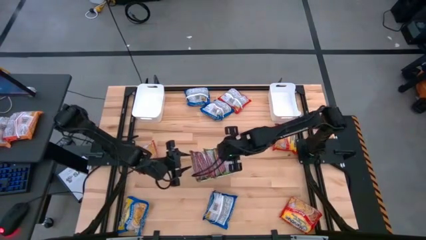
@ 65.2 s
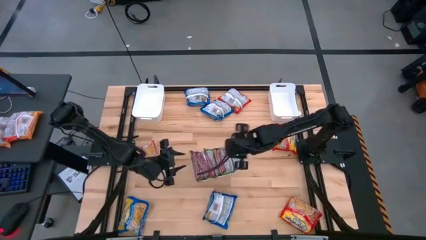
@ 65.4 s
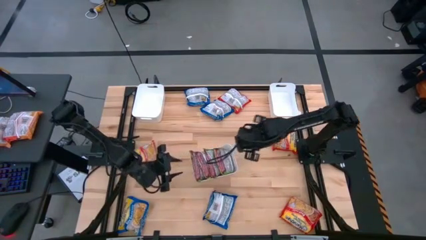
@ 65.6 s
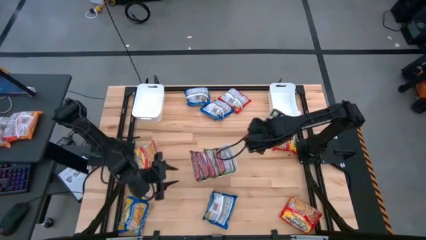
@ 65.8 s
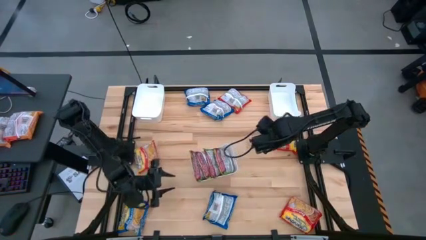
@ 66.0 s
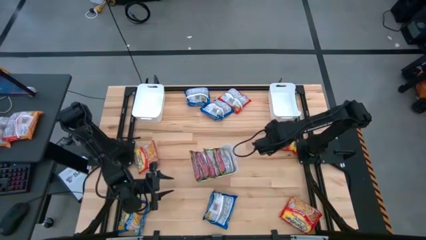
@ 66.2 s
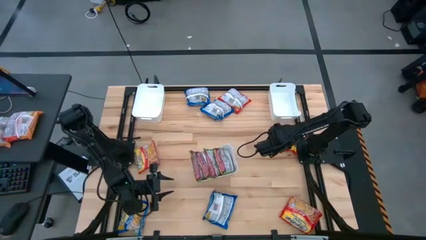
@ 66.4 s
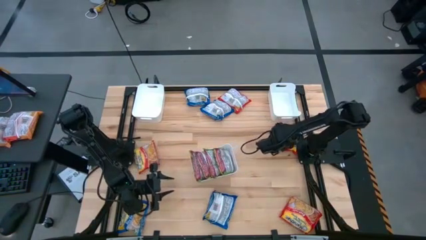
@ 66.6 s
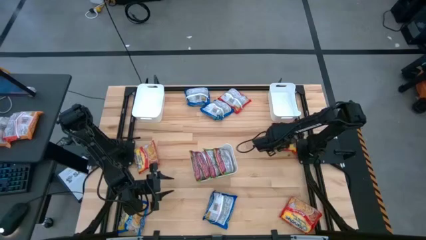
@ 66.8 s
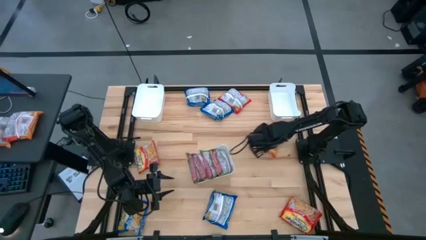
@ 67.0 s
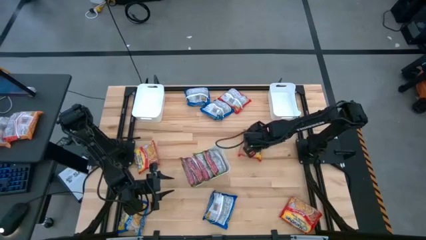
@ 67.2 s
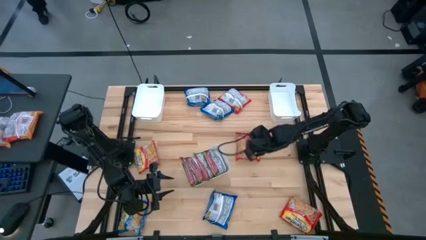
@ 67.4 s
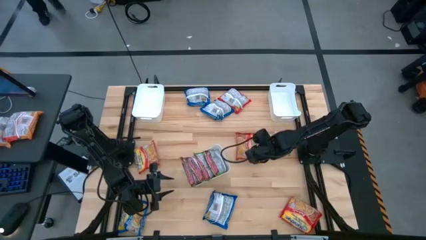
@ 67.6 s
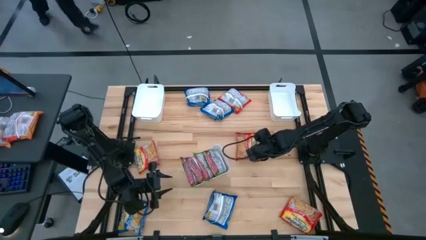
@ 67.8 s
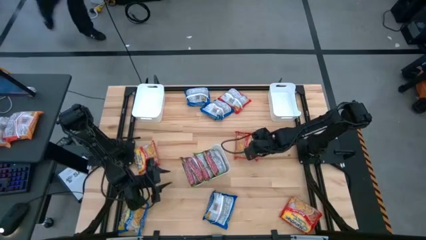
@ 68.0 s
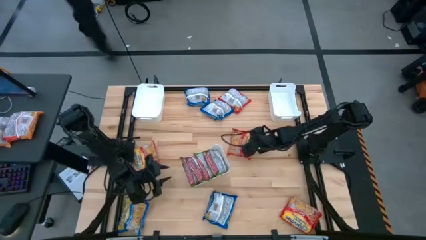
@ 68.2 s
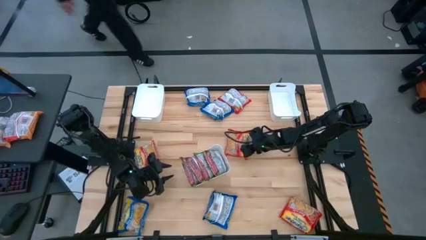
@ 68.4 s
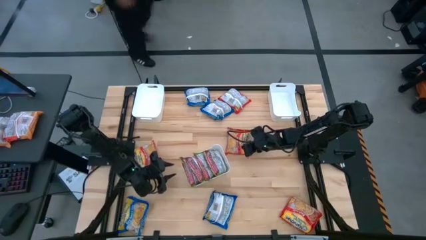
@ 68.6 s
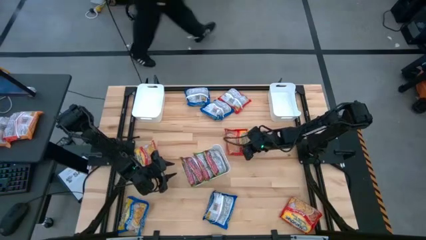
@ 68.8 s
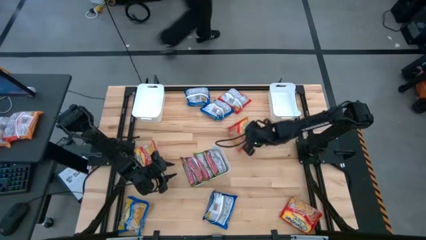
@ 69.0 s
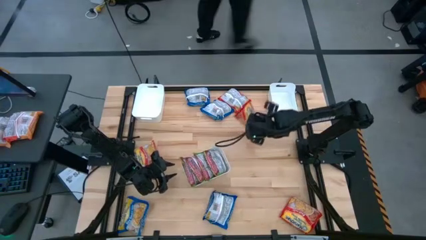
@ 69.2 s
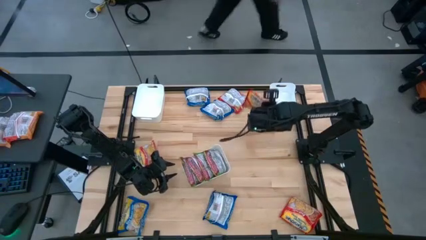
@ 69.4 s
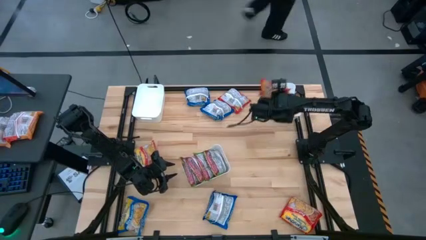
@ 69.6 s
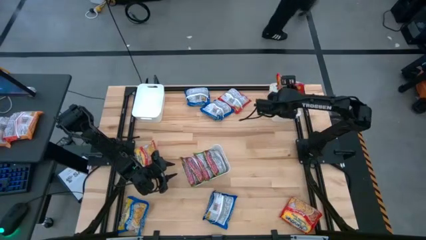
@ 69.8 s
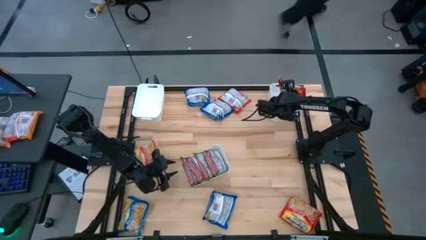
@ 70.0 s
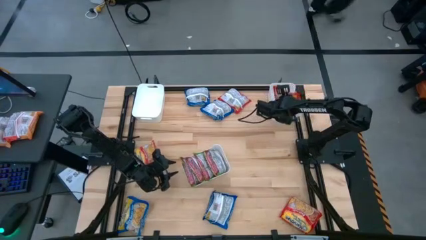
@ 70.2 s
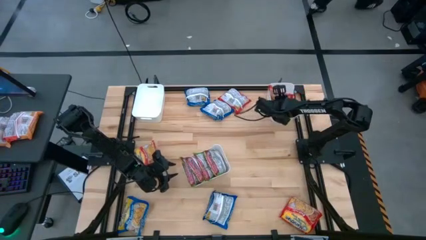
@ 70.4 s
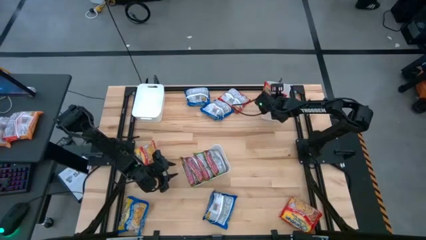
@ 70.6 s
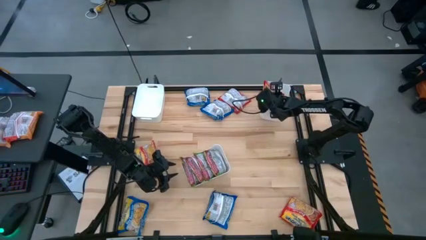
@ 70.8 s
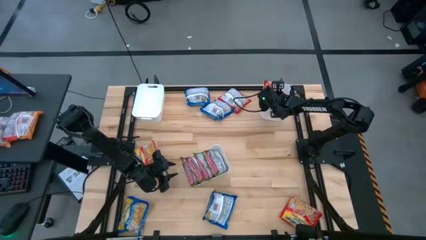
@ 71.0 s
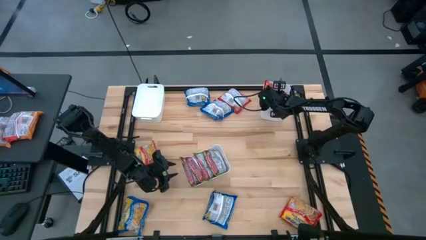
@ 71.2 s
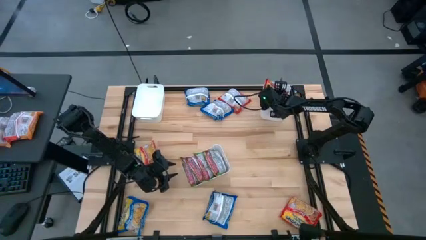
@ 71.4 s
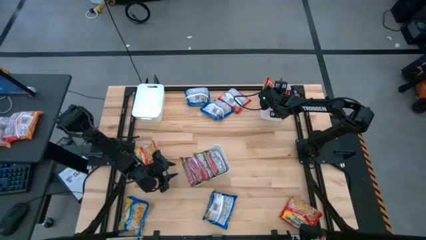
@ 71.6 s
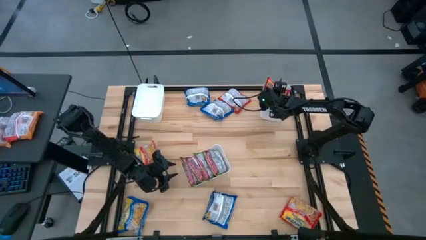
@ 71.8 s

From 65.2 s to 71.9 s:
Task: Sort Maruchan noodles
Put the orange noodle pack into the top right white bin

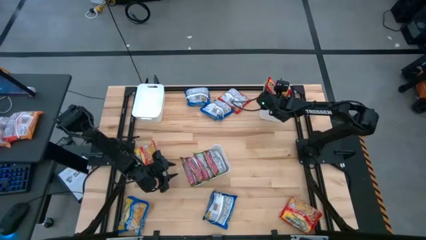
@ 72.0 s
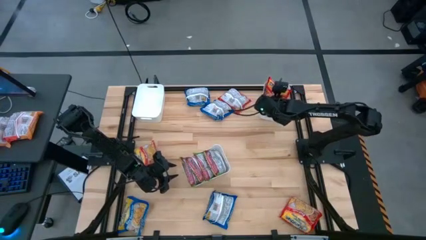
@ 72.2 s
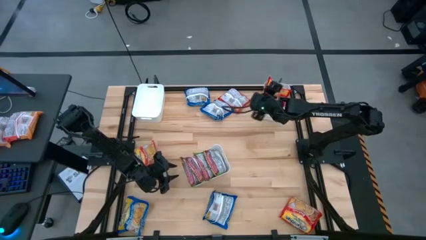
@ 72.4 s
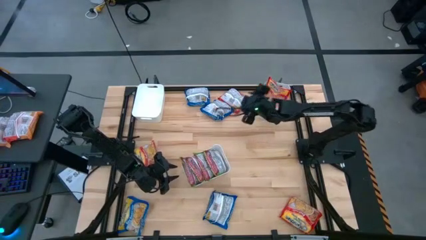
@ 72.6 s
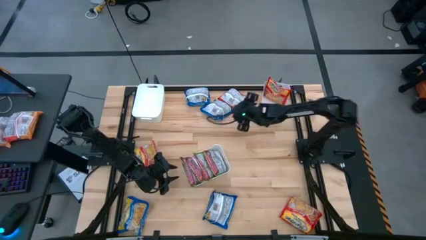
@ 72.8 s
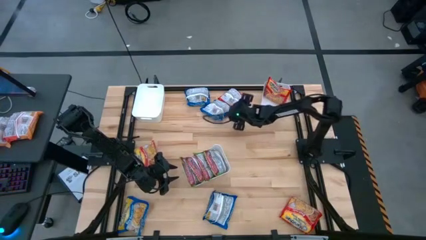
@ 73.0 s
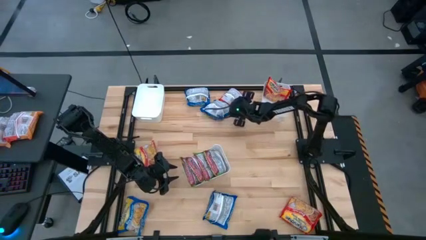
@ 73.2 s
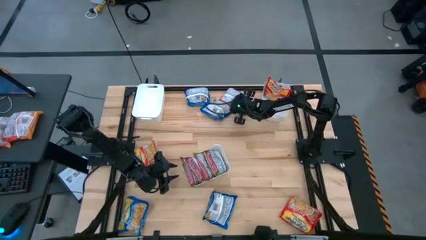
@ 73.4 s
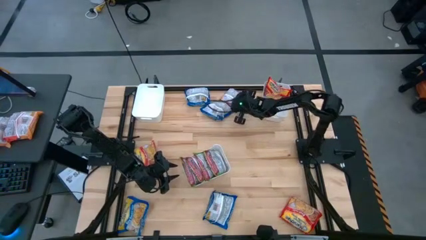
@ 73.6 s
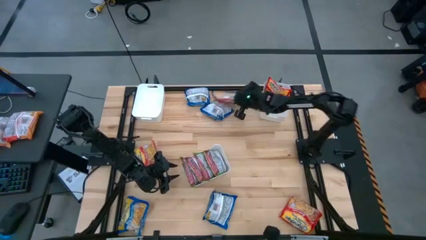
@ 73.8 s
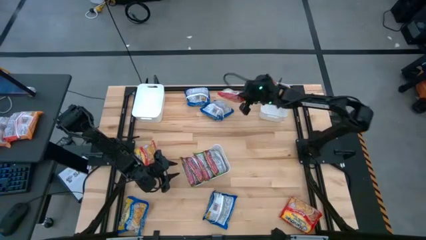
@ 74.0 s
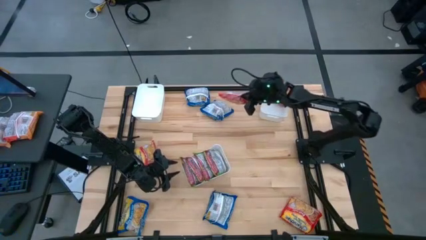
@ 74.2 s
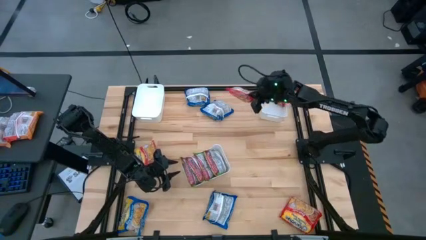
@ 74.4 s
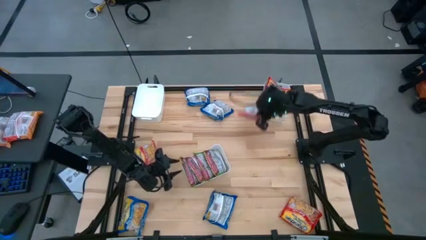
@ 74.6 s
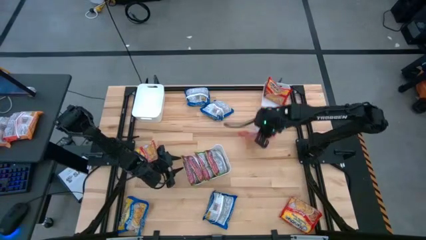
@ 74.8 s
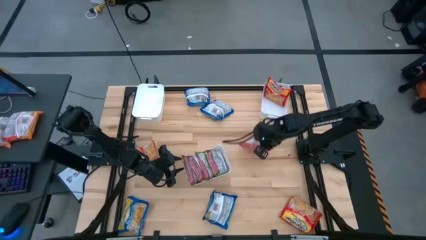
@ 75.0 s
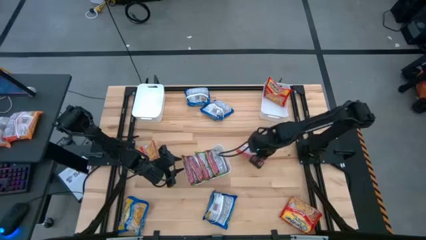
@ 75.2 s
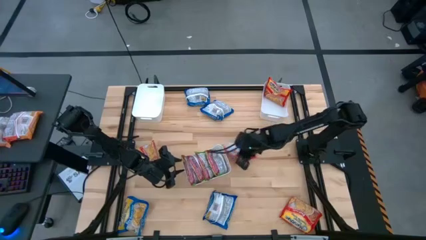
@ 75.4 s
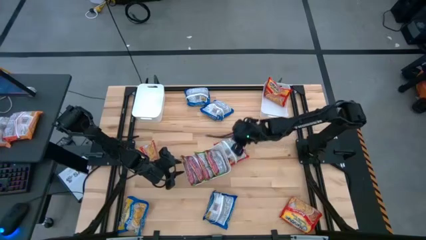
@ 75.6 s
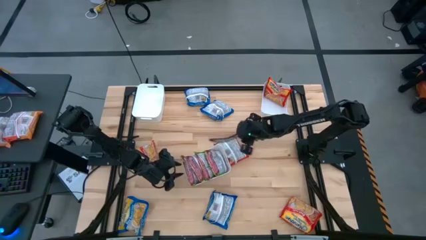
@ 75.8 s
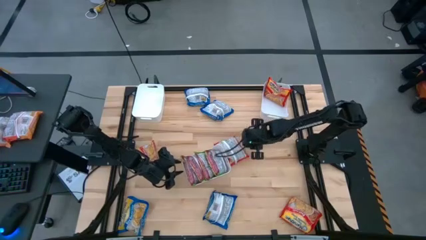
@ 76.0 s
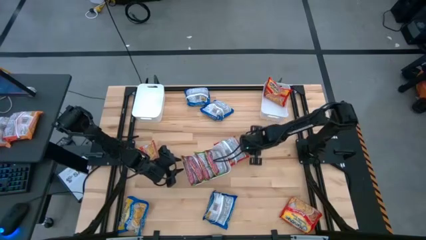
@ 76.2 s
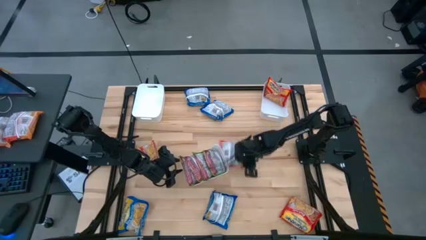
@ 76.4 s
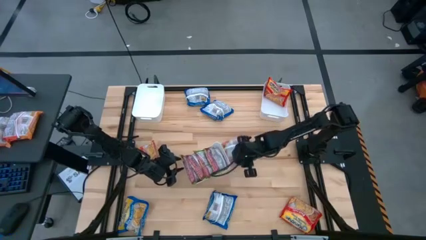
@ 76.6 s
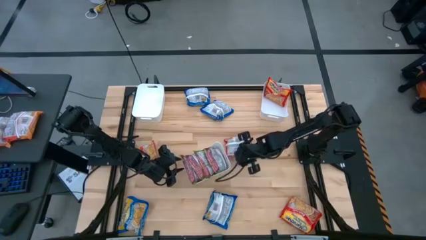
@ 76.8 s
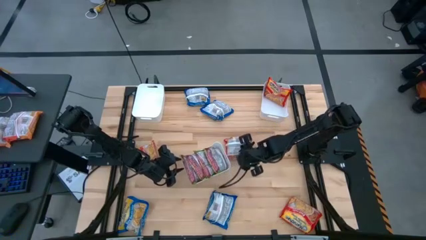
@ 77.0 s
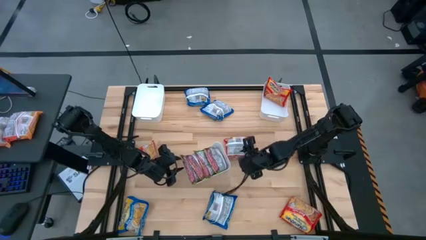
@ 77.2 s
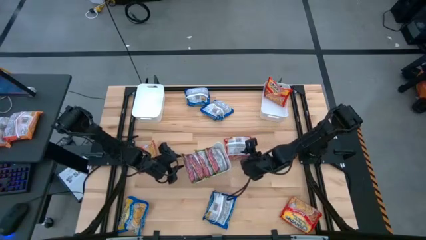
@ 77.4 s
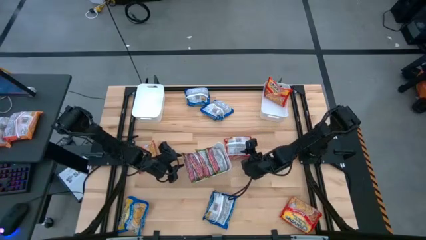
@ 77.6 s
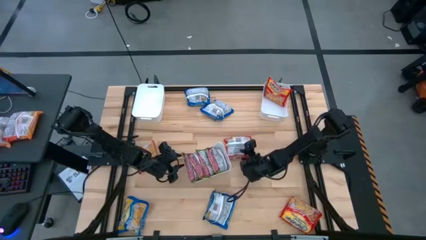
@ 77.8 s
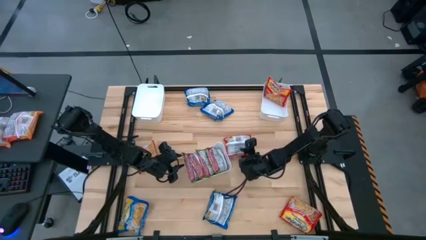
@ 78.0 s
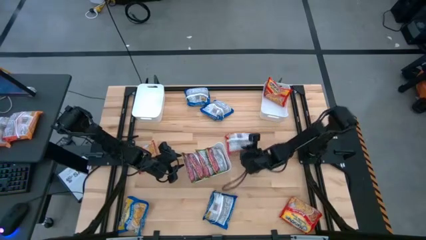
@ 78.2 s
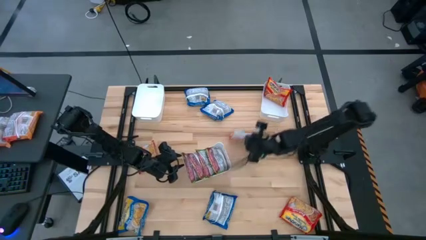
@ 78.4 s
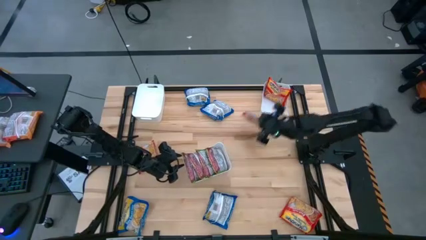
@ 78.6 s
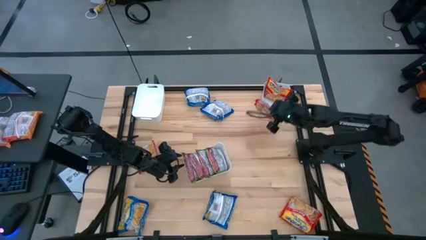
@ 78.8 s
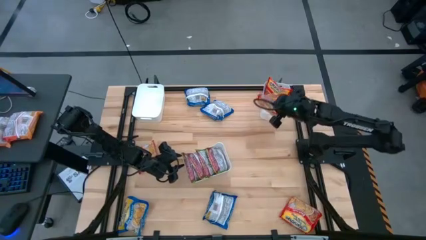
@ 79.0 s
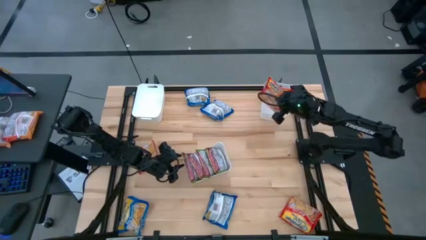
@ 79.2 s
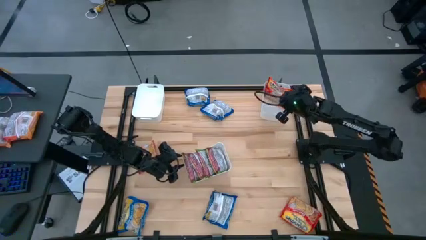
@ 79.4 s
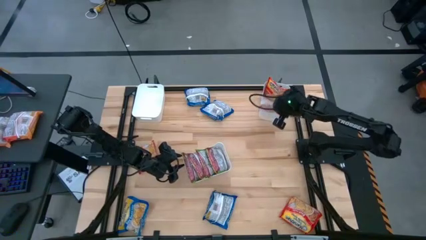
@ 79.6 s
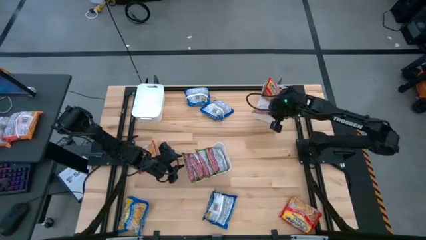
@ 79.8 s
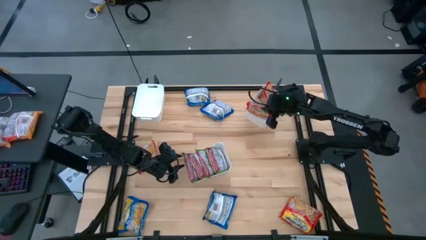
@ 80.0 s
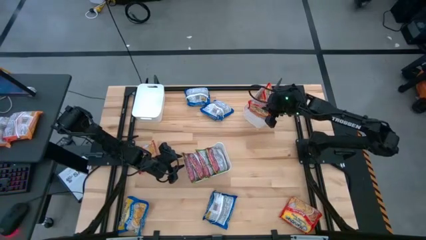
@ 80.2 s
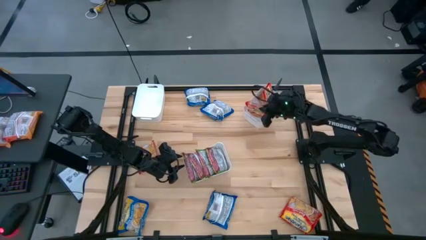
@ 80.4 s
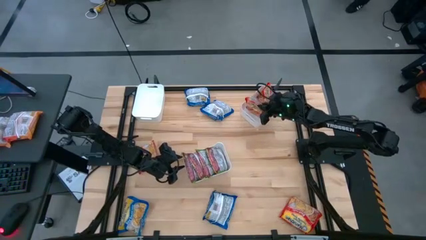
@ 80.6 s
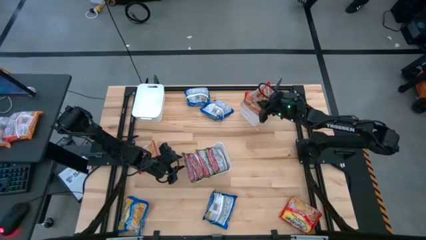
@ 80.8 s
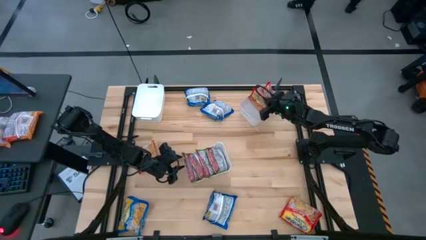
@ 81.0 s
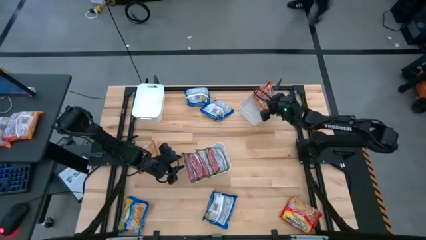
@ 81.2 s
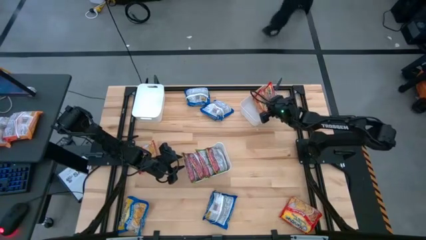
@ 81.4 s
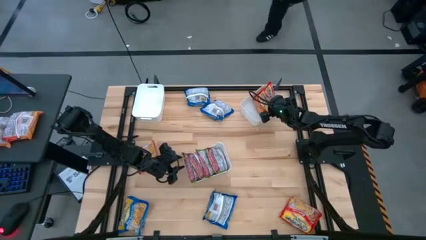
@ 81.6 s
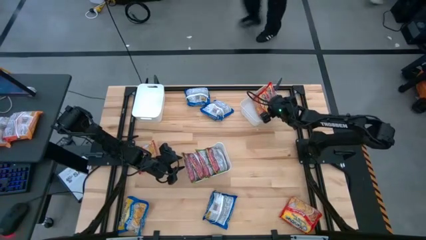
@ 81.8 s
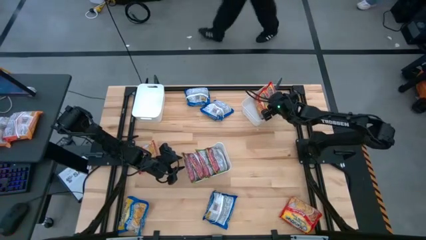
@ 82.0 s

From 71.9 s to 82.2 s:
Put the orange noodle pack into the top right white bin
